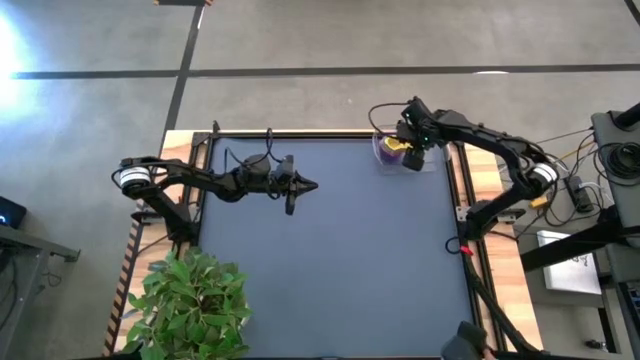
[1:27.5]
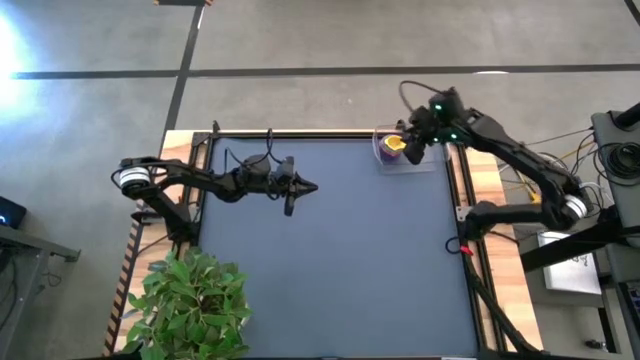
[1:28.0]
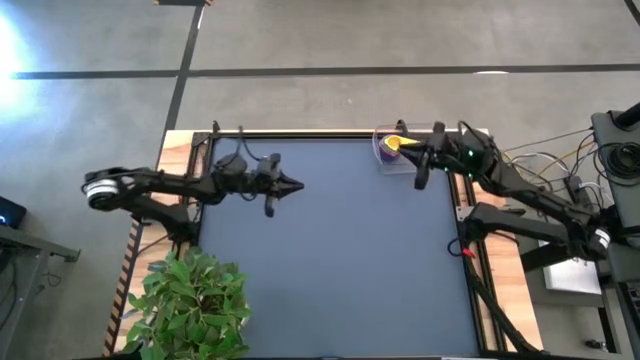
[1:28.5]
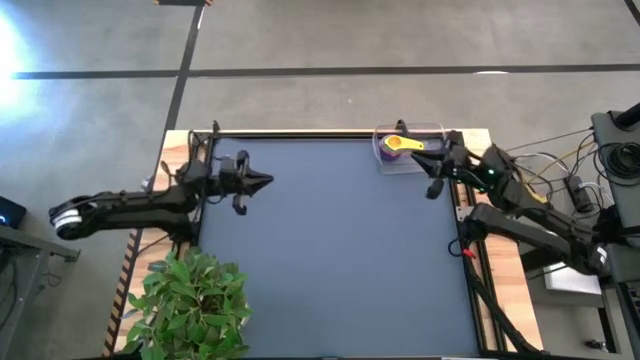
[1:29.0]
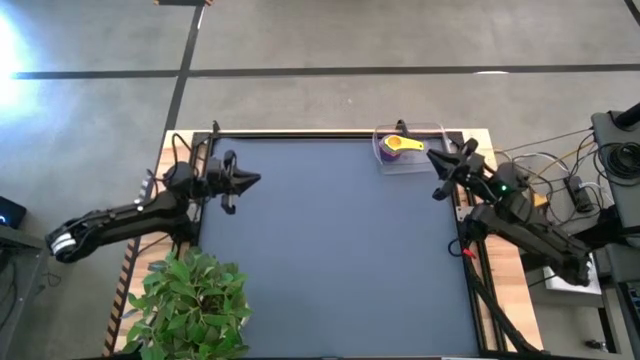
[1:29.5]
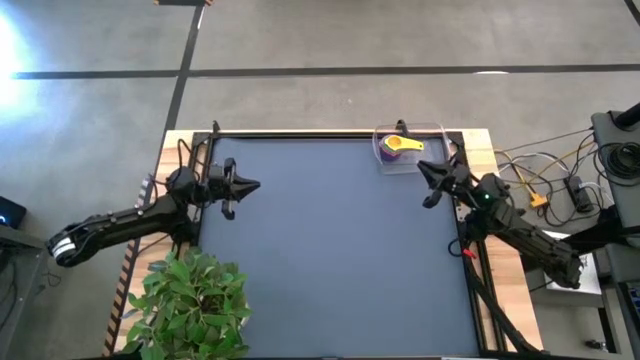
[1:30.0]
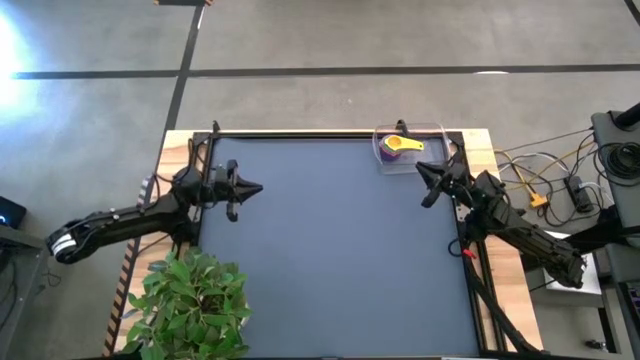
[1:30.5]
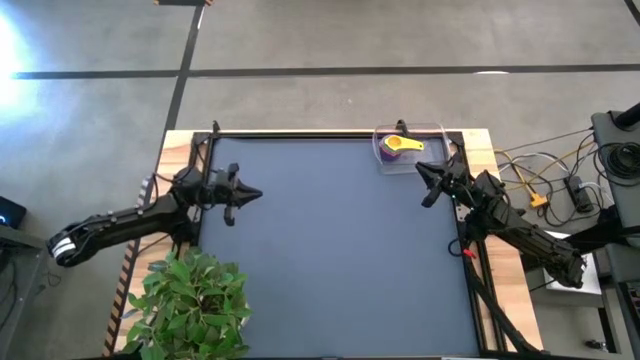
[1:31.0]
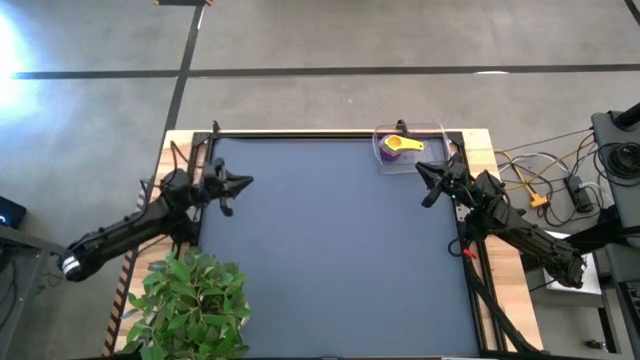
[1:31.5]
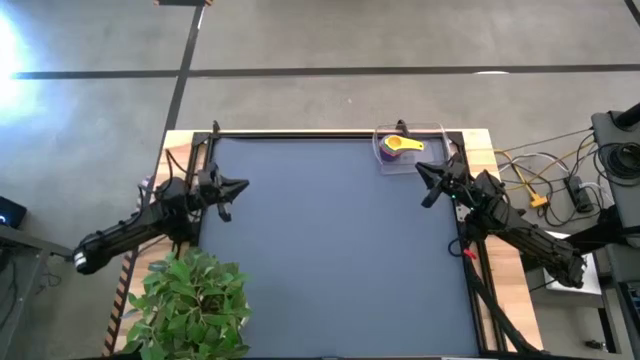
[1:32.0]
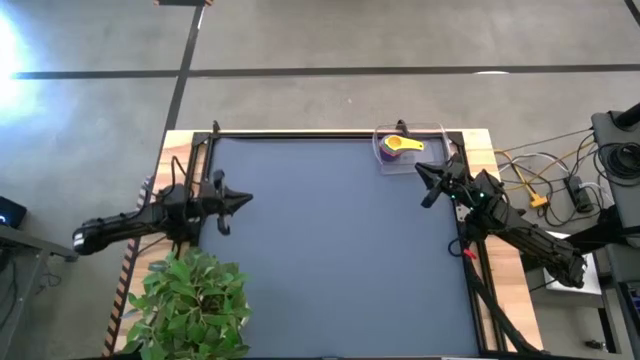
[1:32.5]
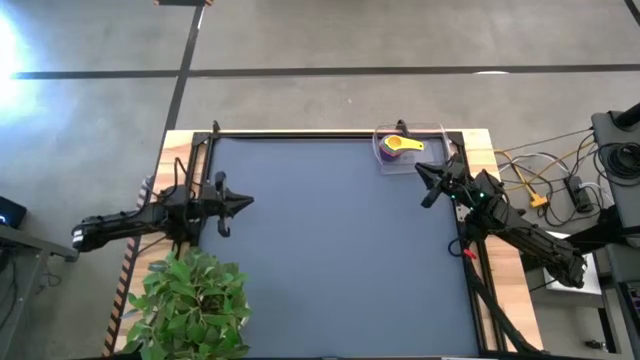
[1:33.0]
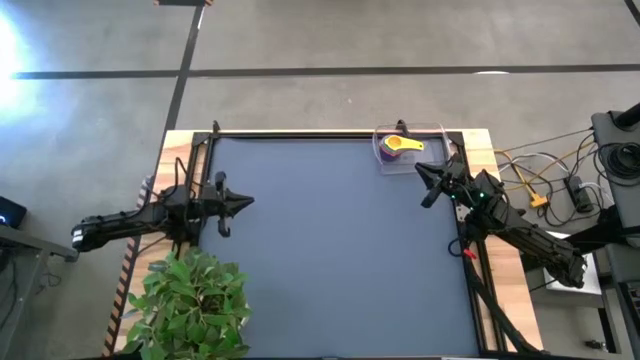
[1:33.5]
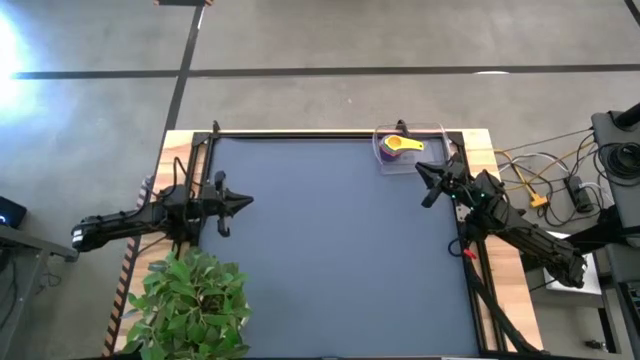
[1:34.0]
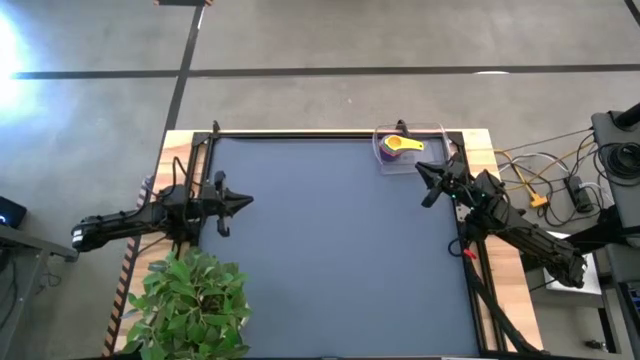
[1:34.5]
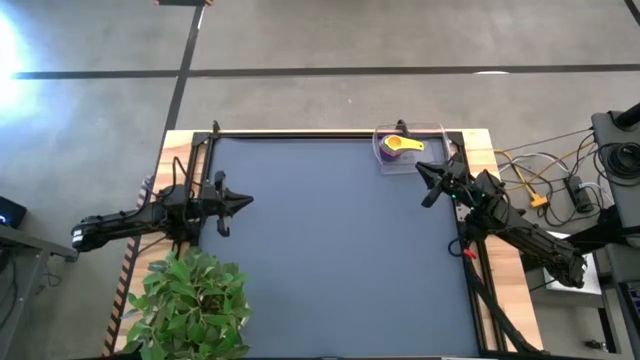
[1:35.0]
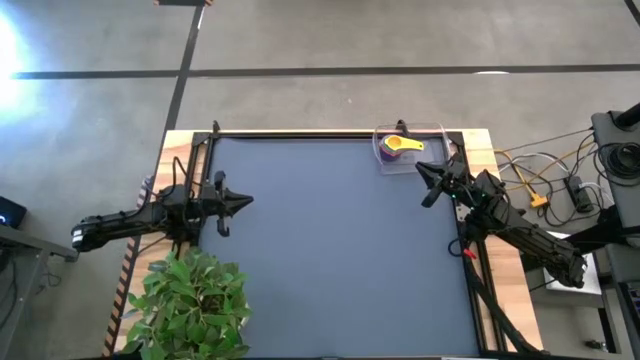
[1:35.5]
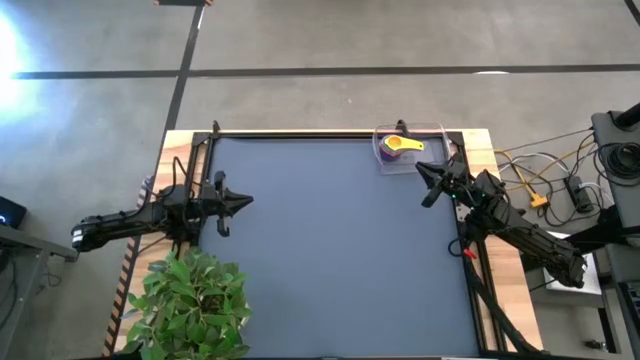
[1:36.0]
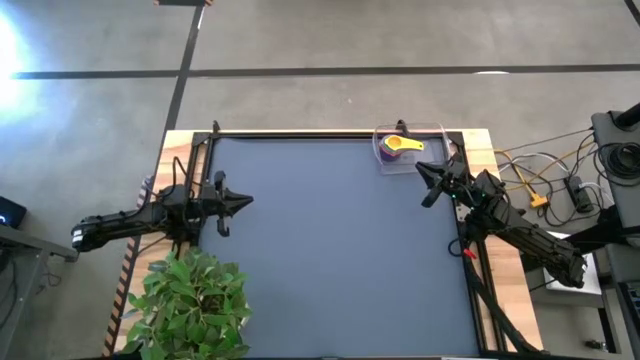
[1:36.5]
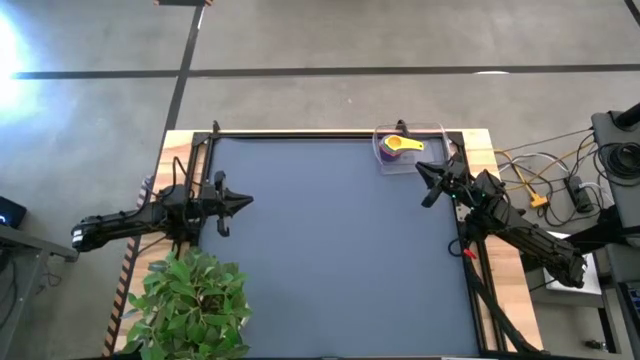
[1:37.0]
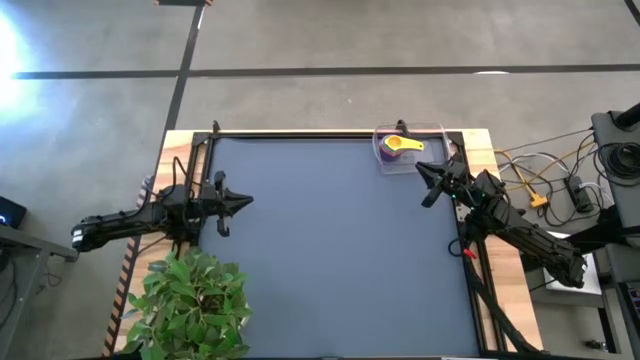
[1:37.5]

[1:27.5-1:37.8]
Task: Nest measuring cups in basket
Return to Home Position

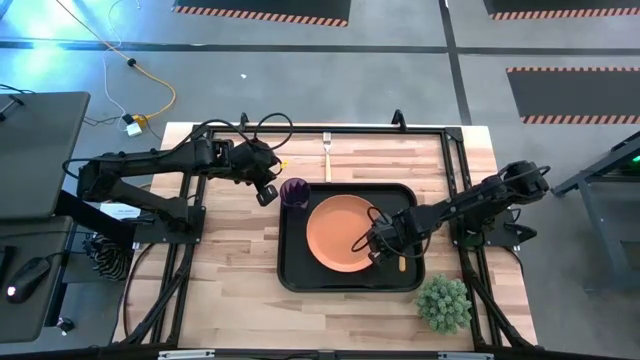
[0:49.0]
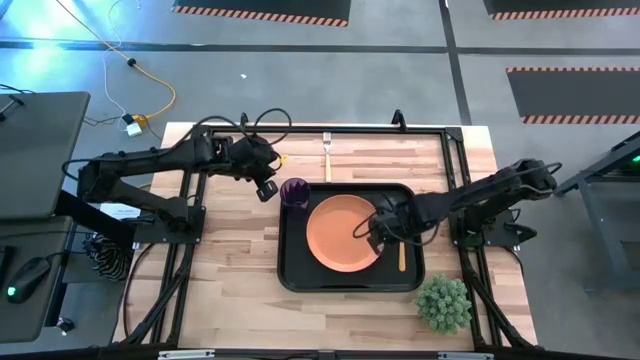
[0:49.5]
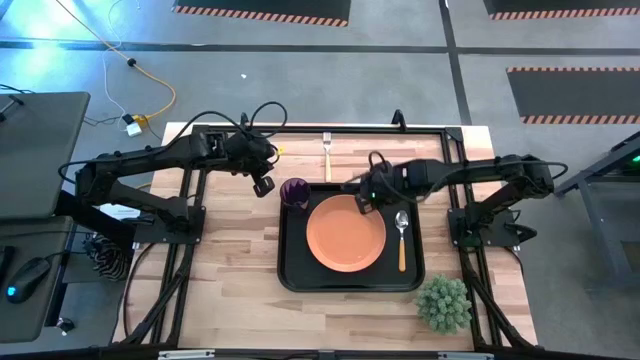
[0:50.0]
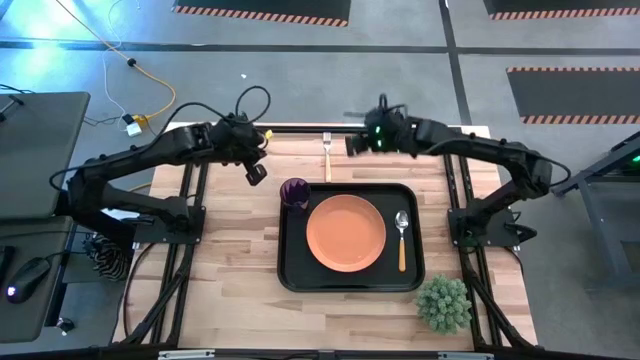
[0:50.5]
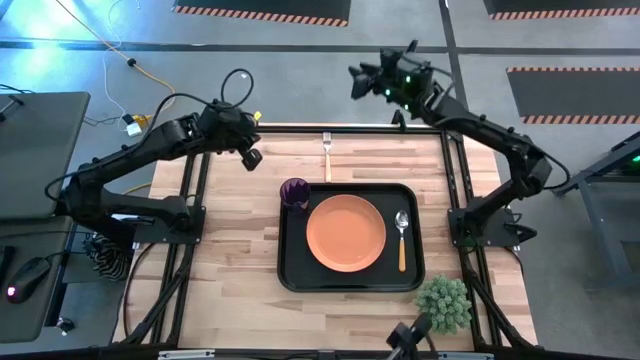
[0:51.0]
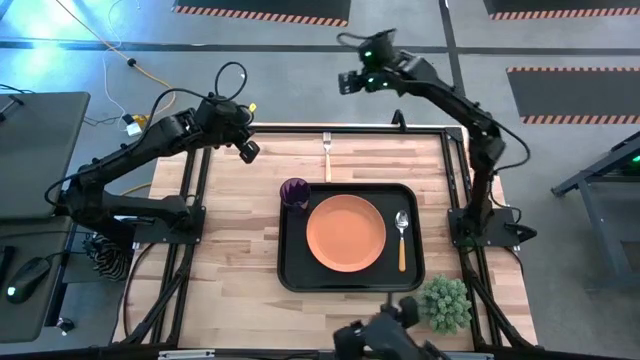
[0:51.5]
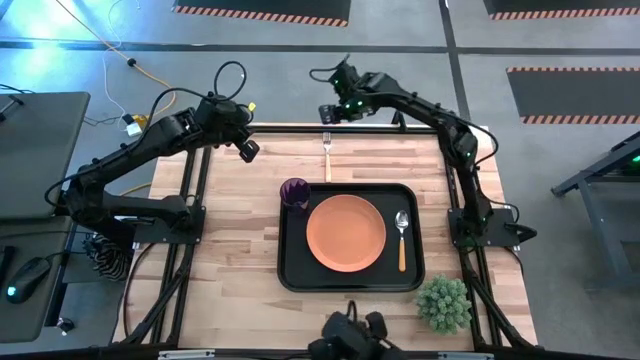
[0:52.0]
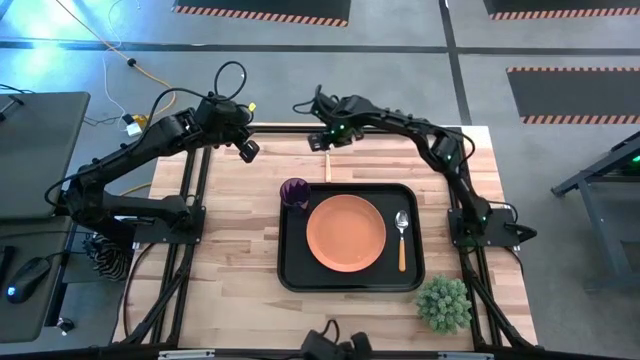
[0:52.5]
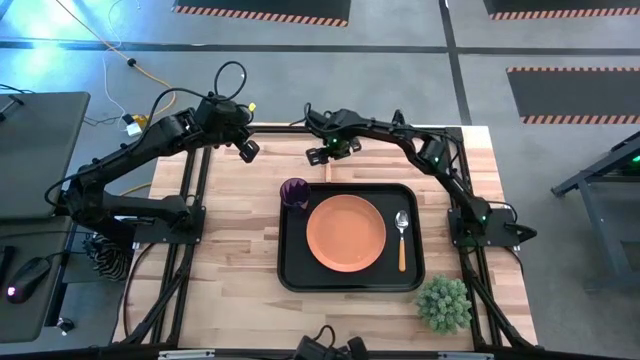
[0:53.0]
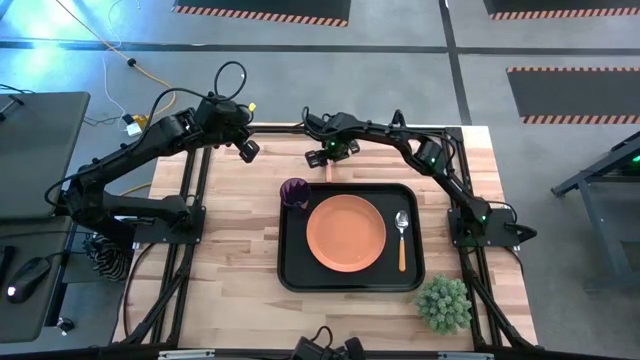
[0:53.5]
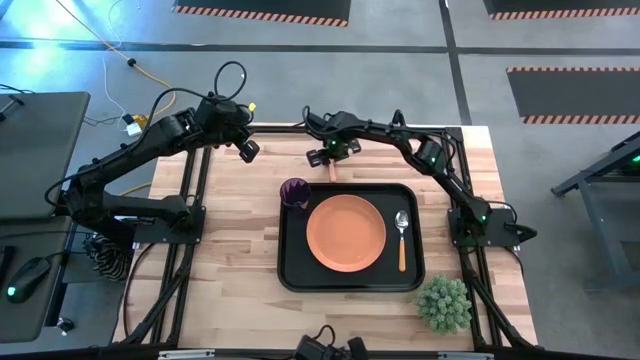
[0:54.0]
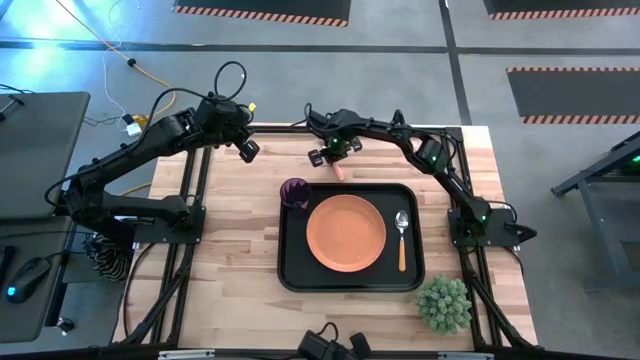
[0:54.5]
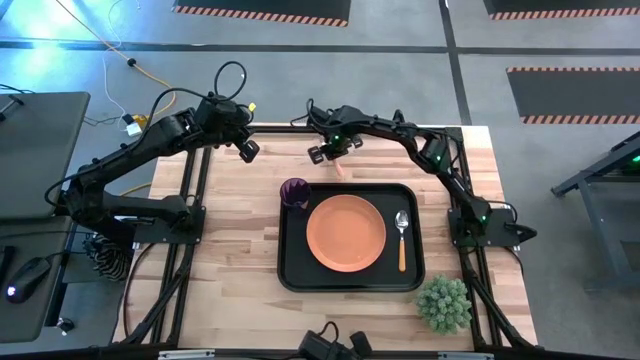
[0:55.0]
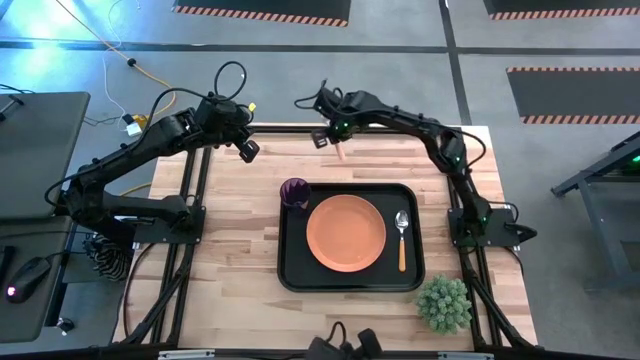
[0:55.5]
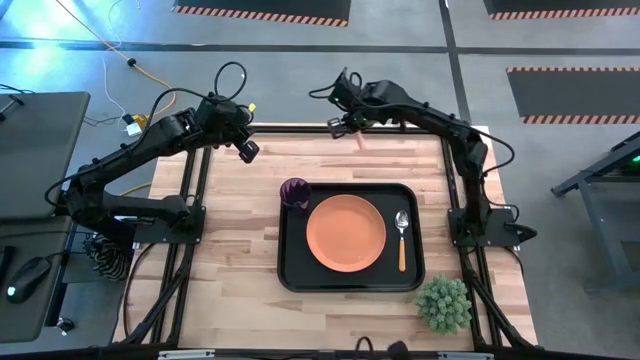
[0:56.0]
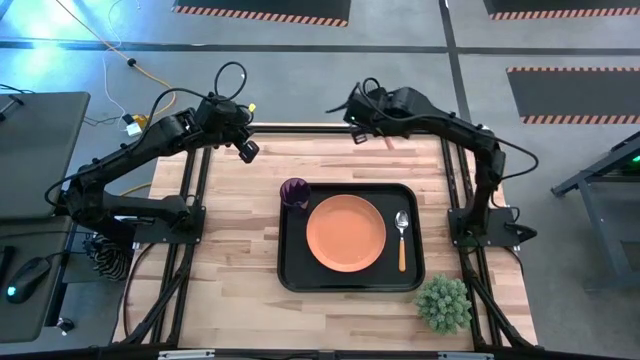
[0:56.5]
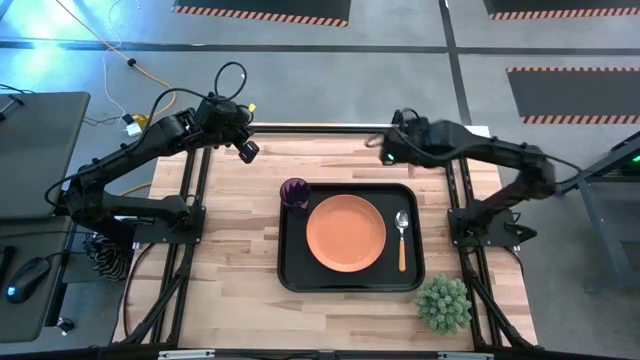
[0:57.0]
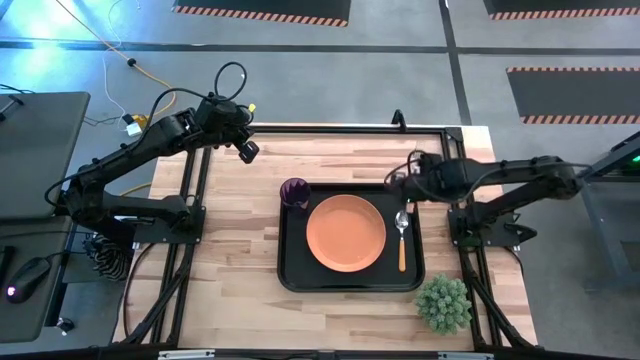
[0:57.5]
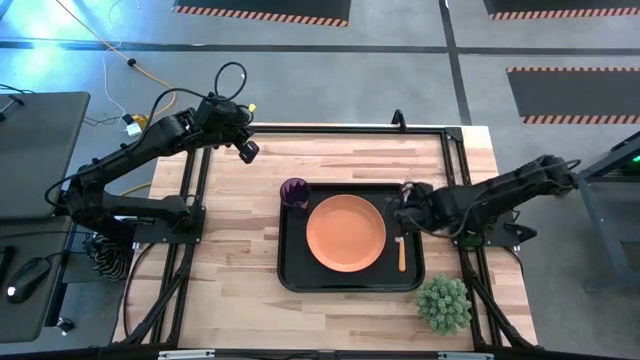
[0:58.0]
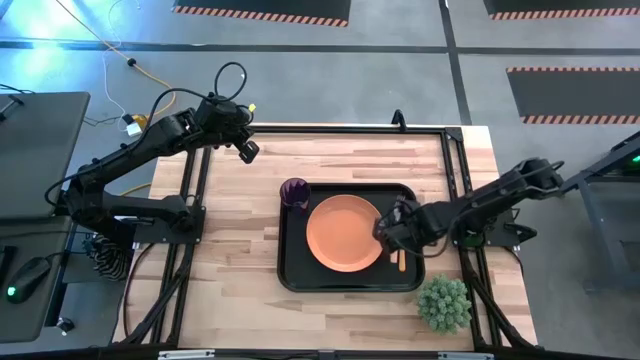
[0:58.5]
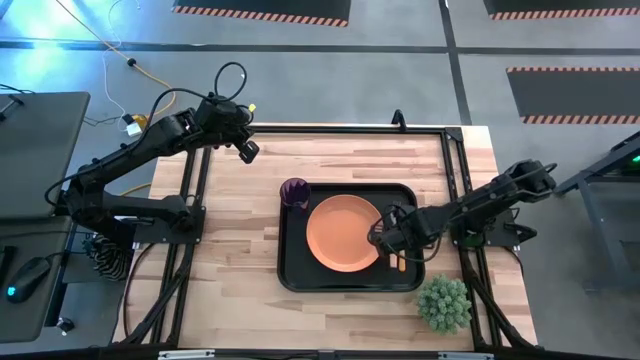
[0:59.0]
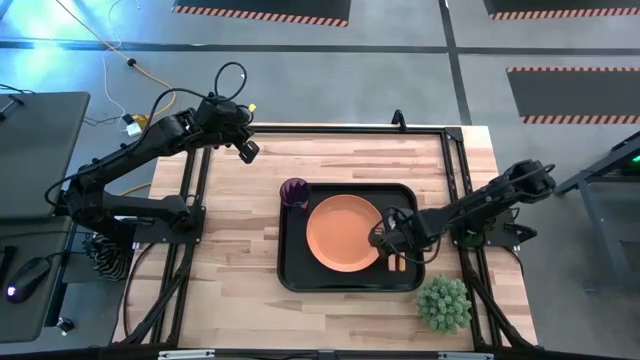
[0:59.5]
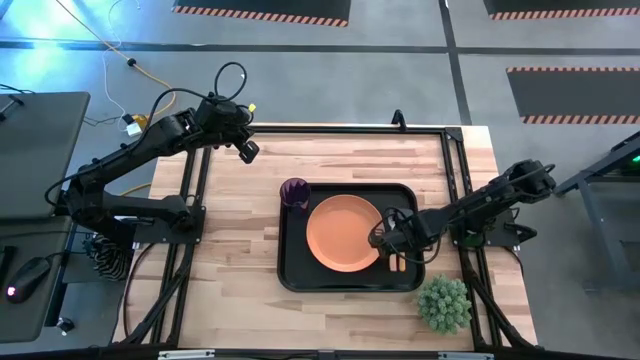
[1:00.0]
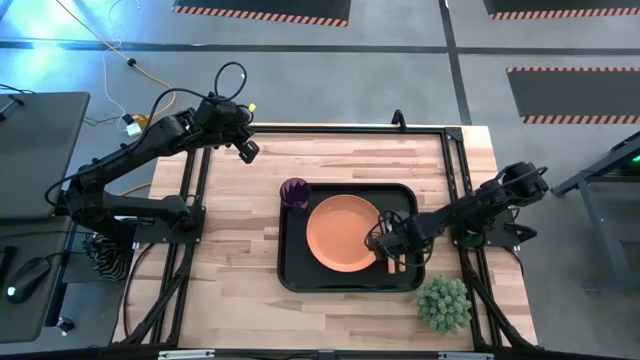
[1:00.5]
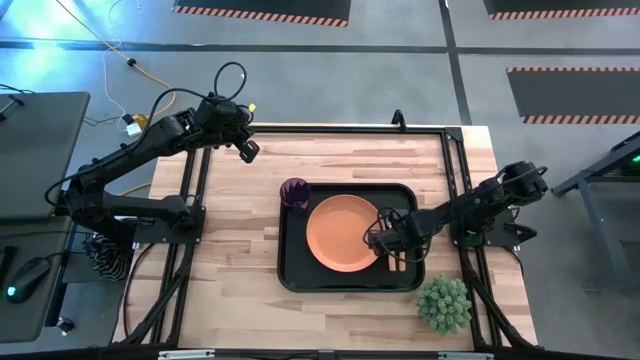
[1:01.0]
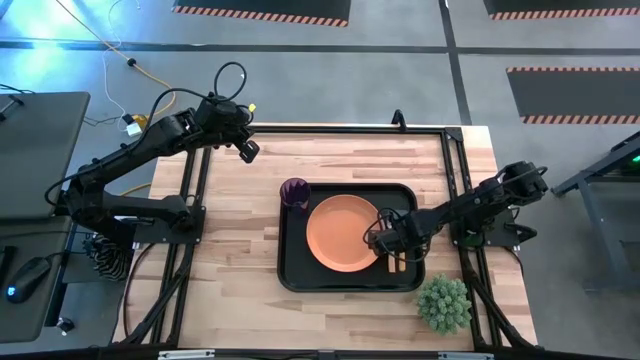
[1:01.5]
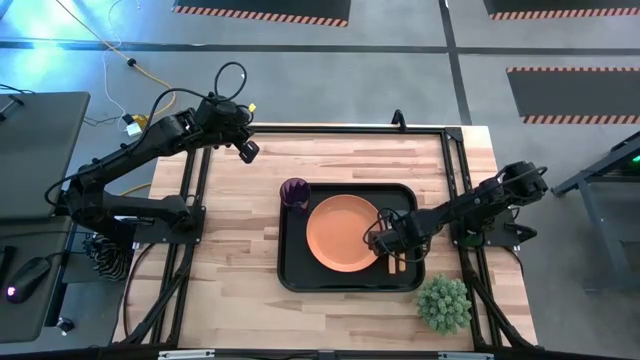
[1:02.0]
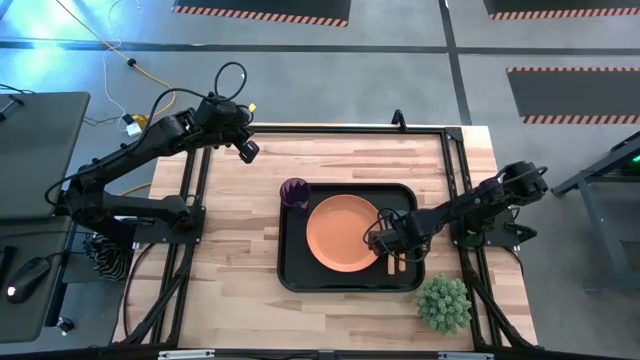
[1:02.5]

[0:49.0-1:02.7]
Task: Pick and place plate/cup/fork/spoon on tray
Put the orange fork on the black serving tray between the orange plate and orange spoon
